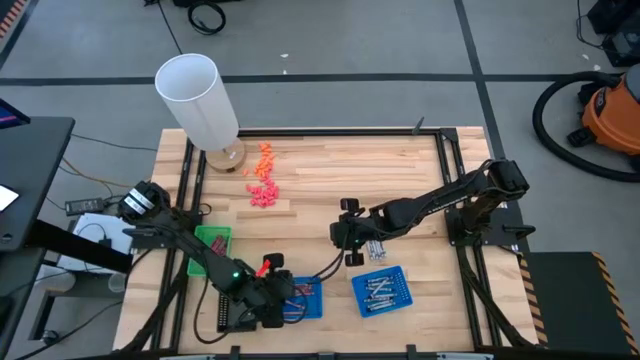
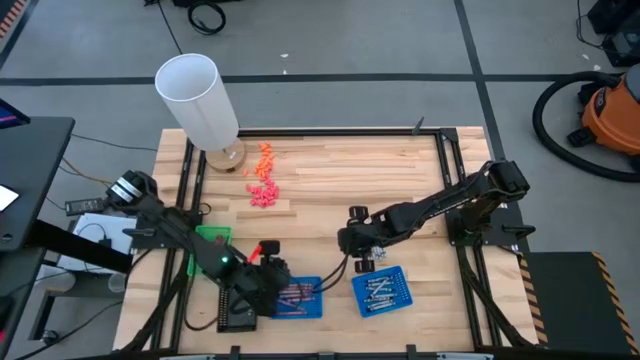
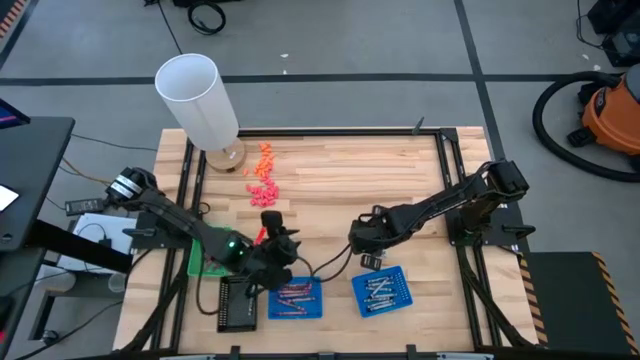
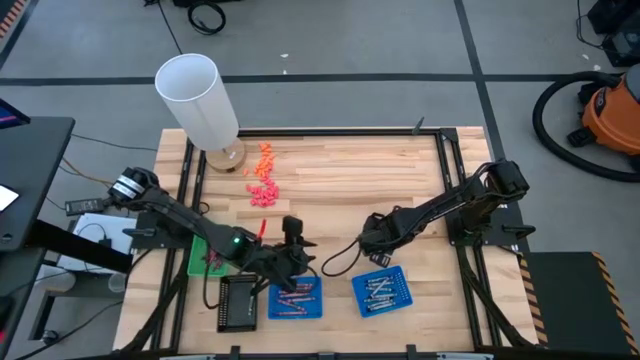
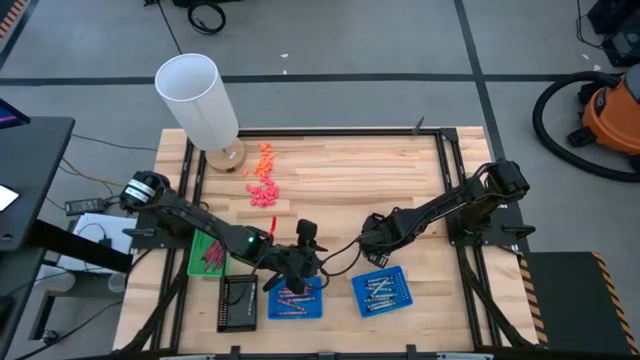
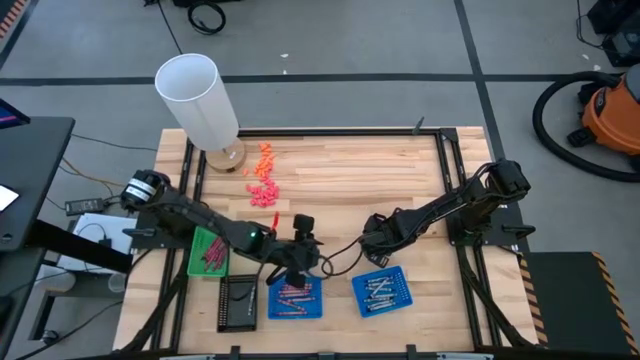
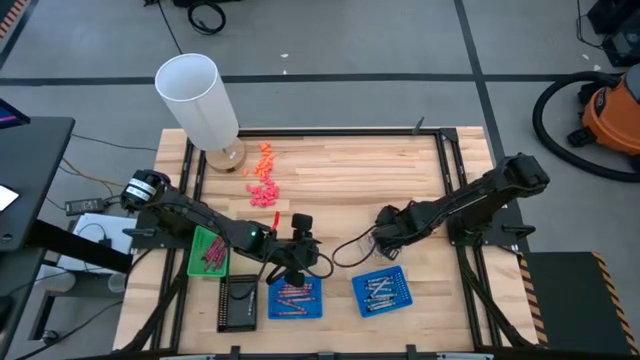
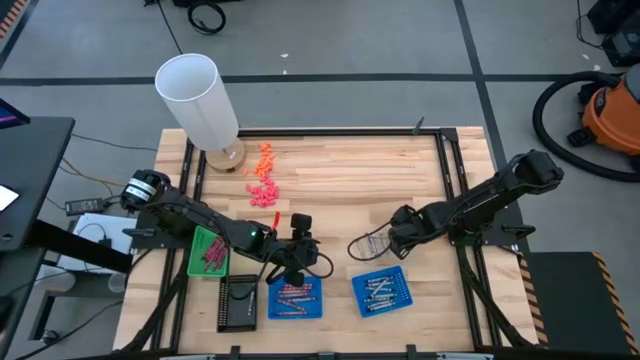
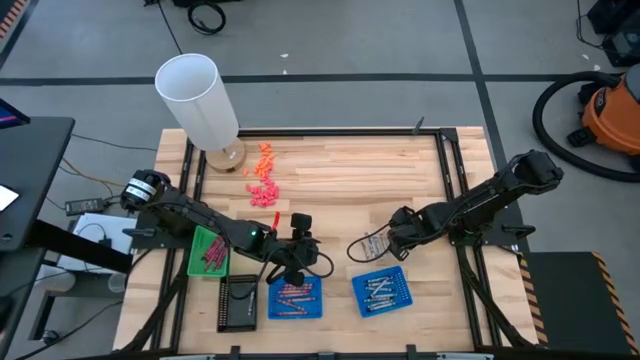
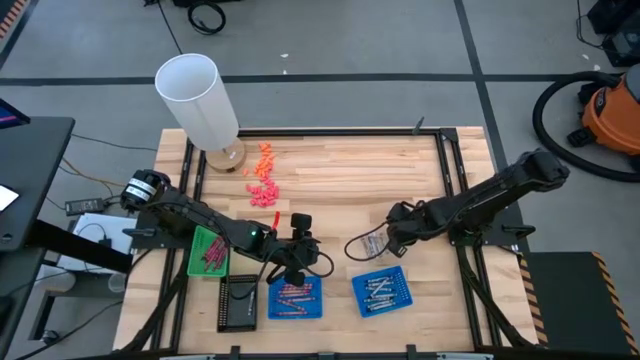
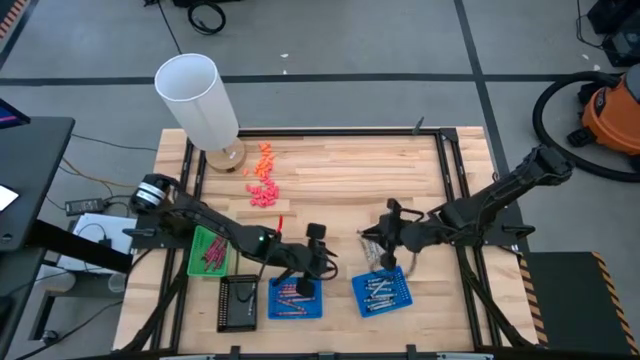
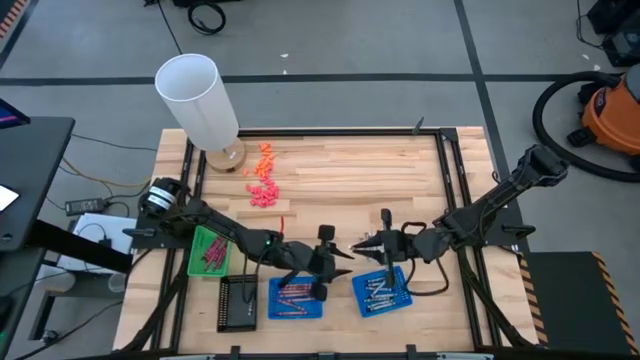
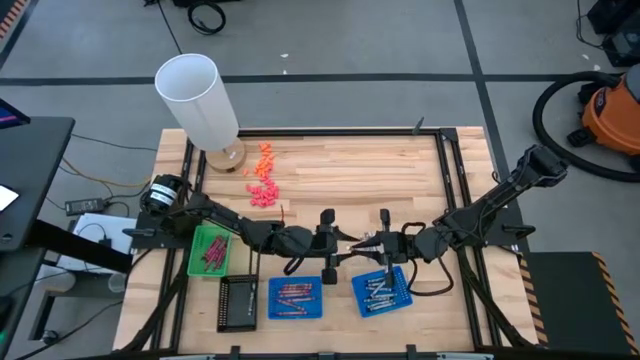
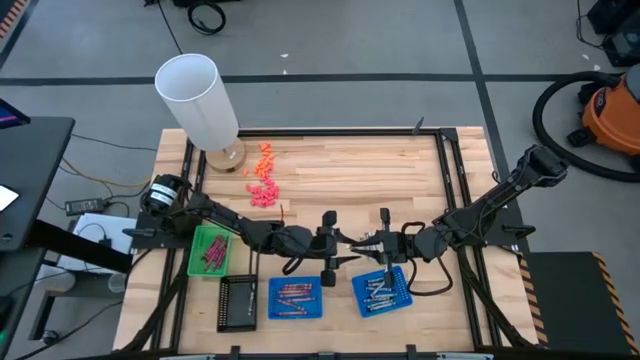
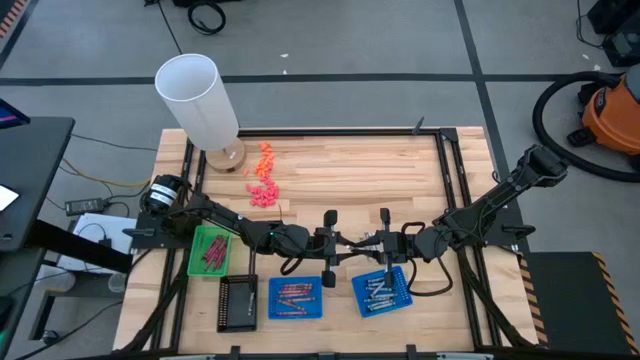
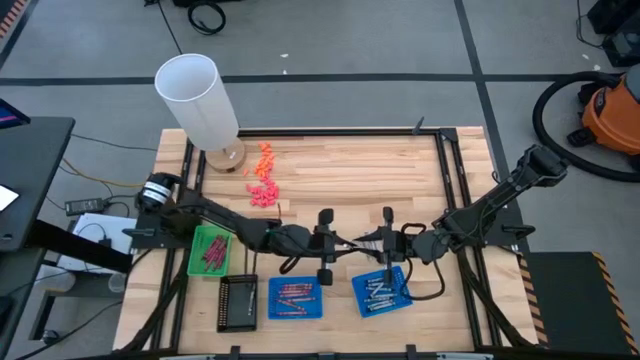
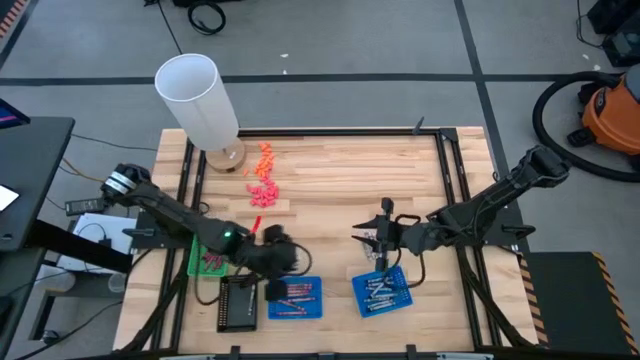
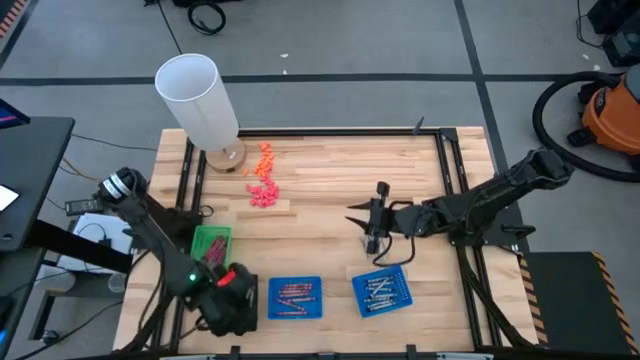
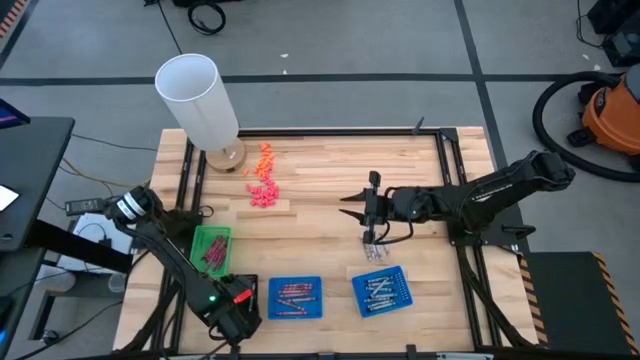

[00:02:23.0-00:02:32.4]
Task: Sort crayons
Put the white crayon into the black basket

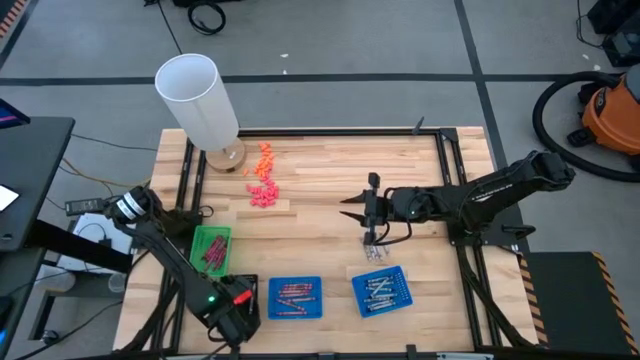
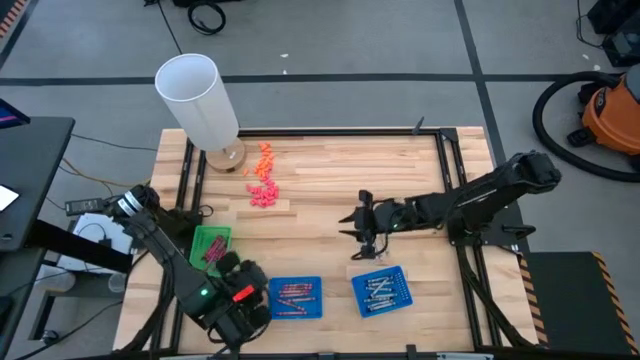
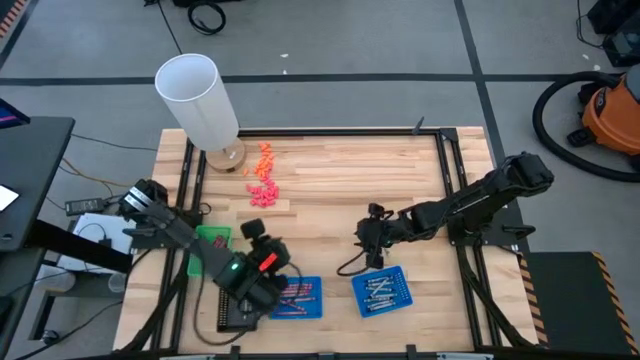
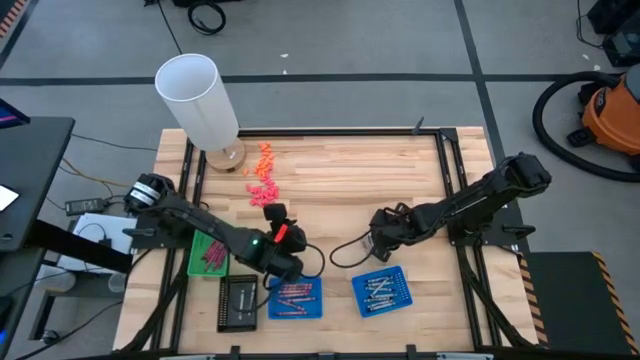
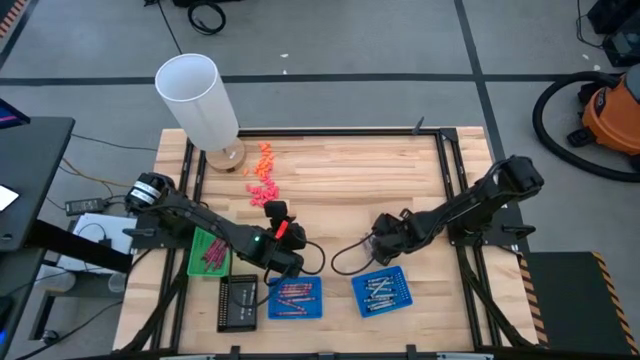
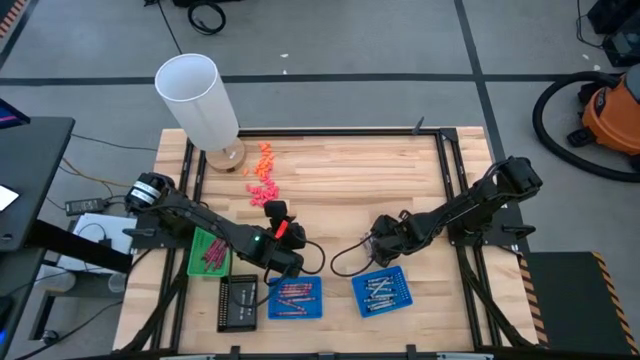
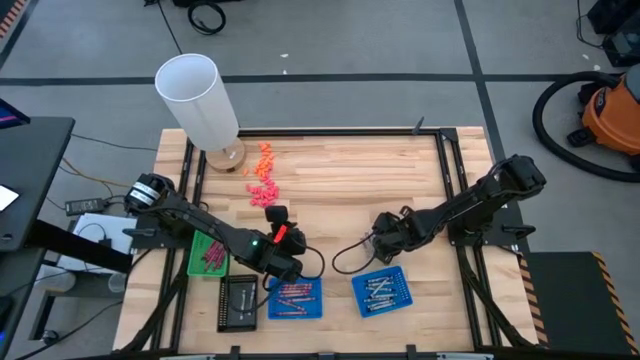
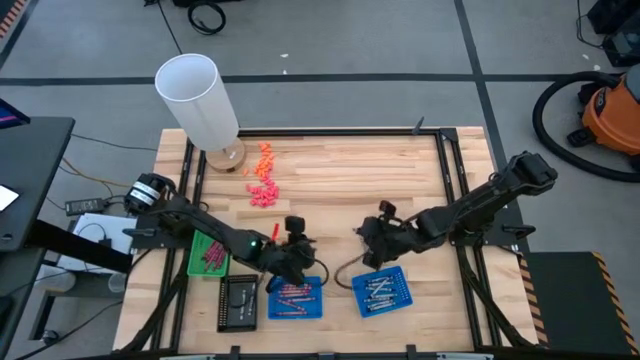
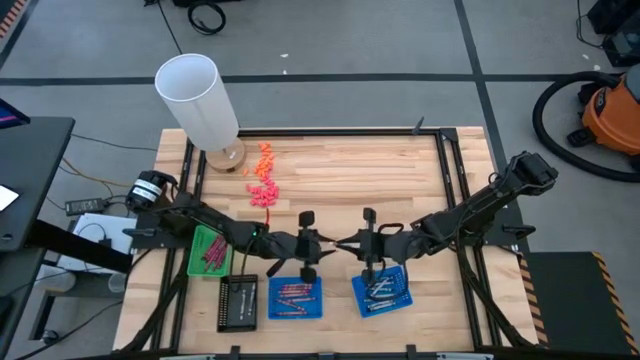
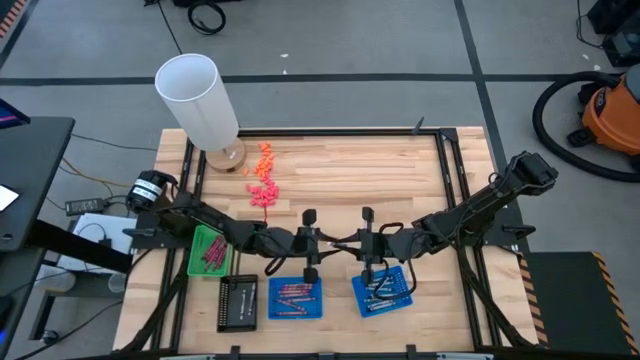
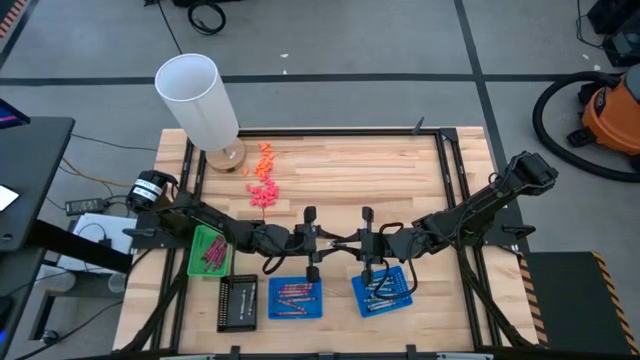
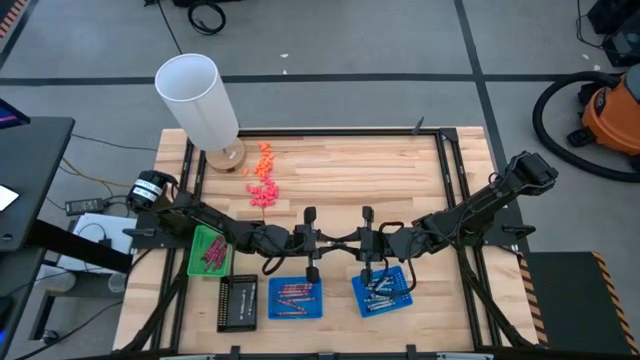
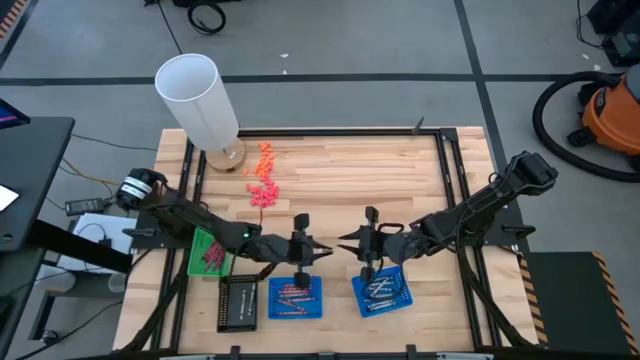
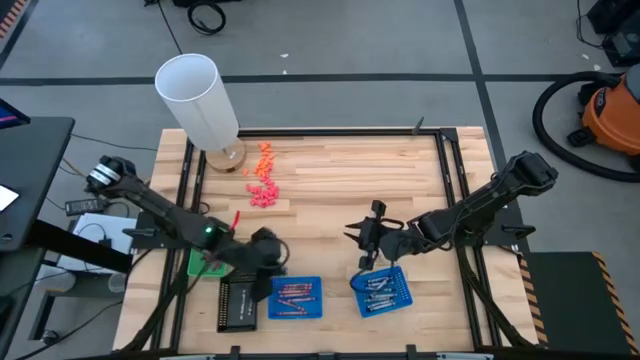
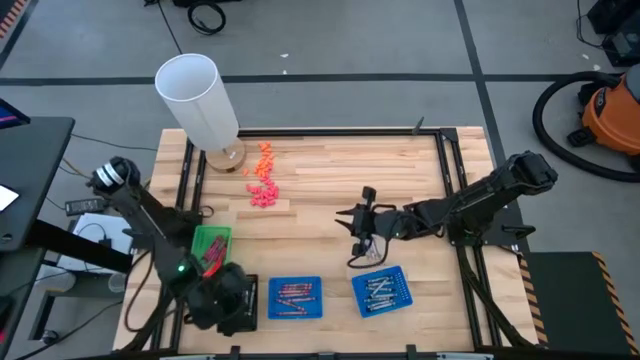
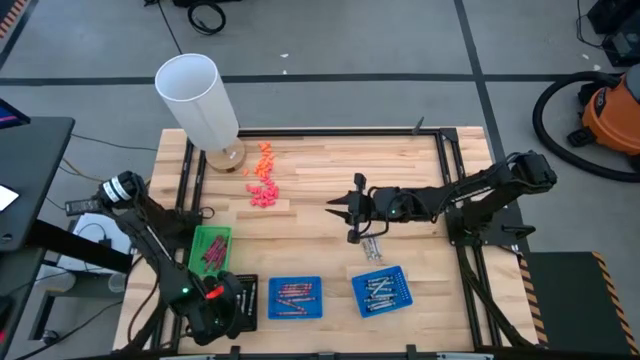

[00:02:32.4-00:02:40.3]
Put the white crayon into the black basket

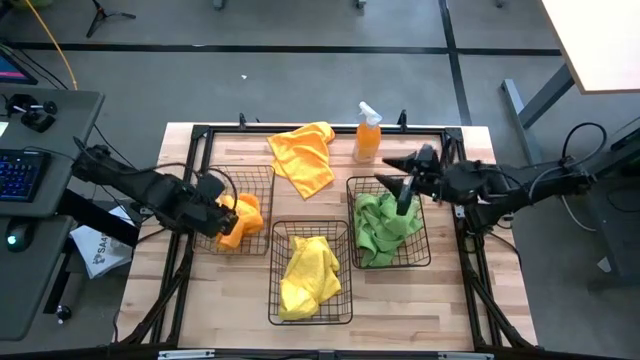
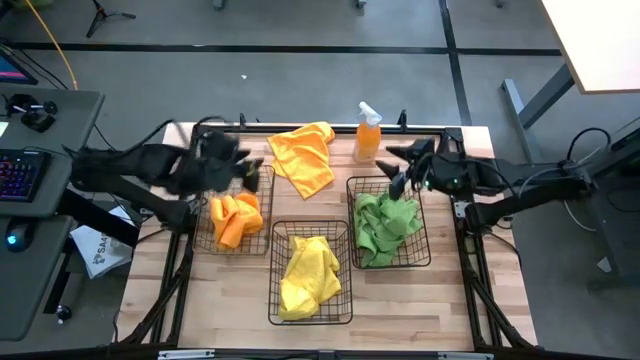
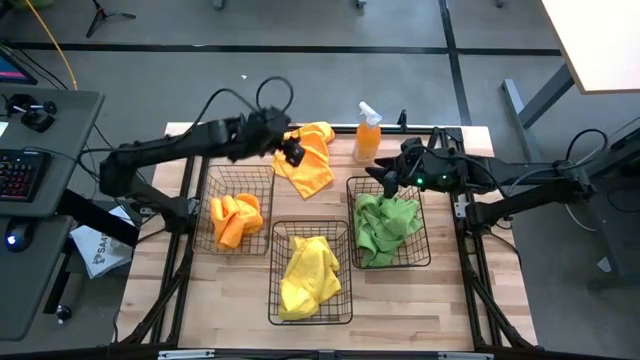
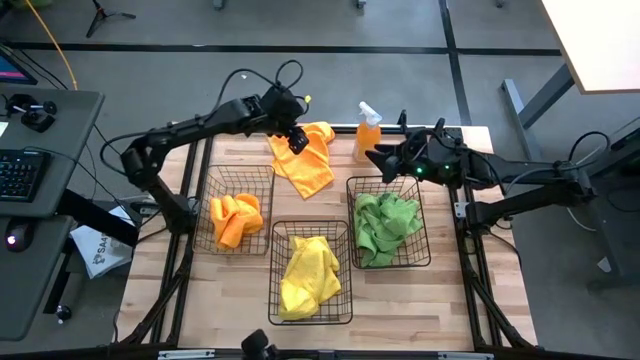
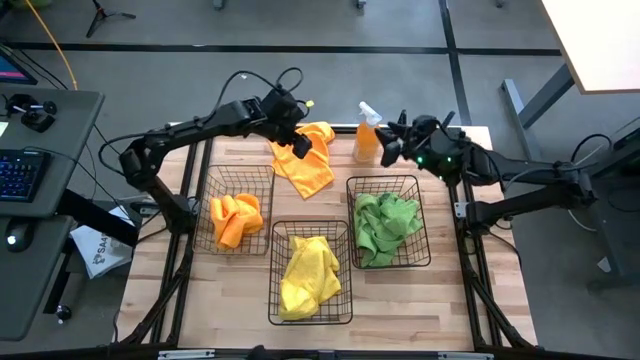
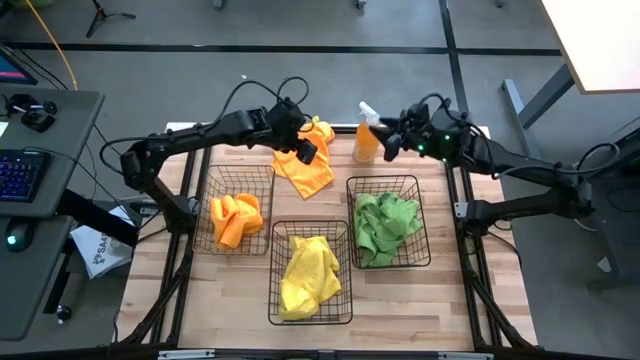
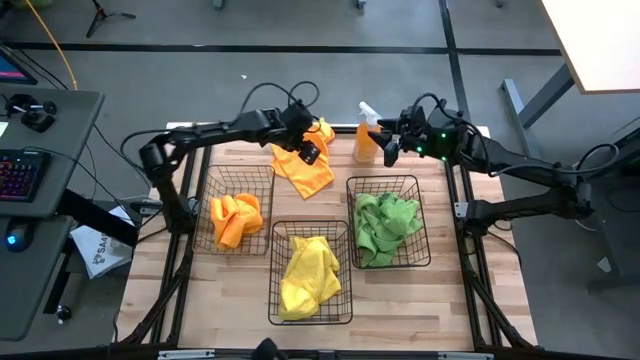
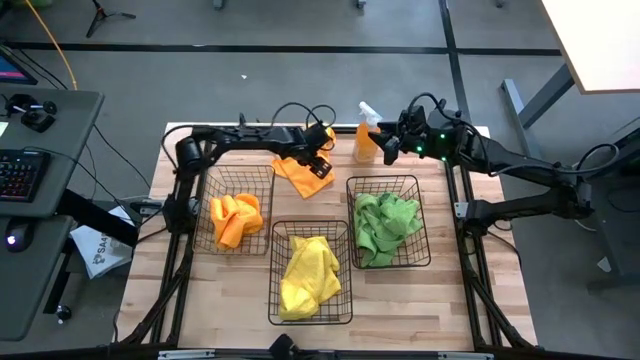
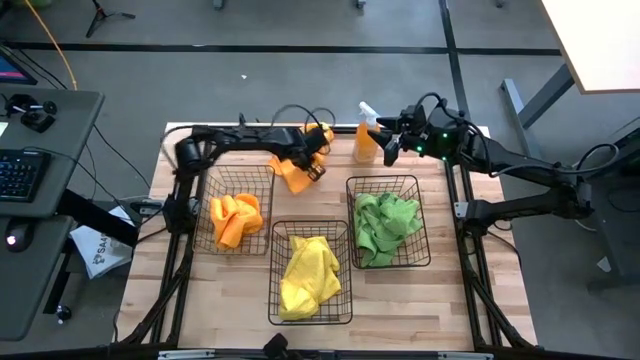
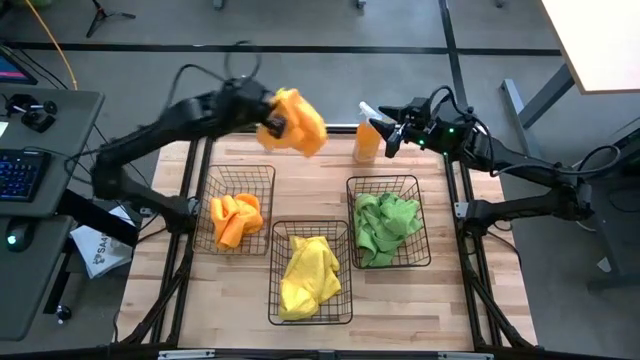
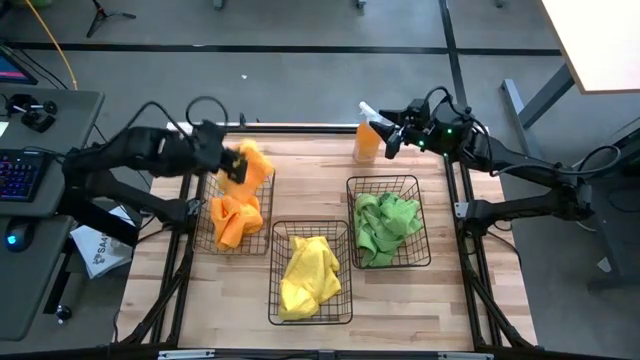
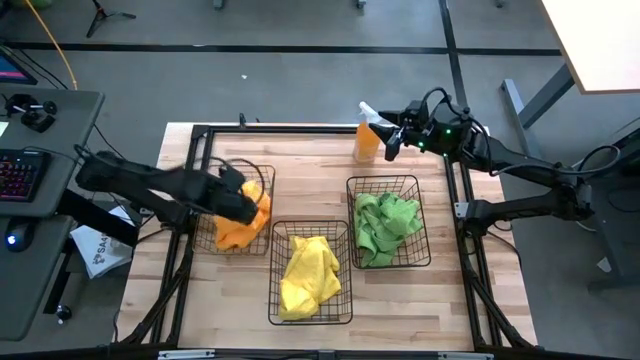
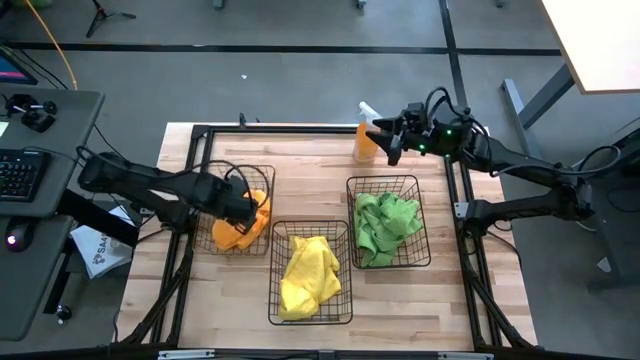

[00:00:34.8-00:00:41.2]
Task: Sort microfiber towel by color & place in baskets
Put the microfiber cloth into the left basket
